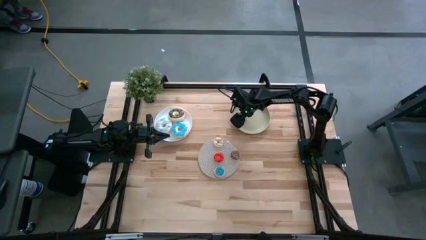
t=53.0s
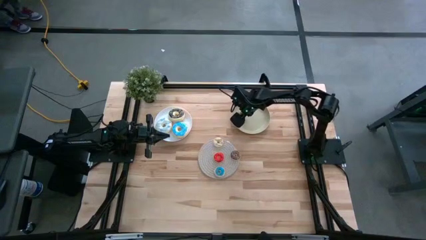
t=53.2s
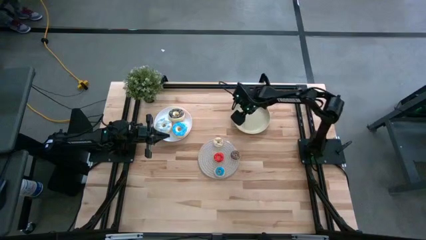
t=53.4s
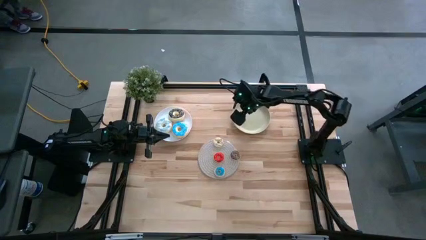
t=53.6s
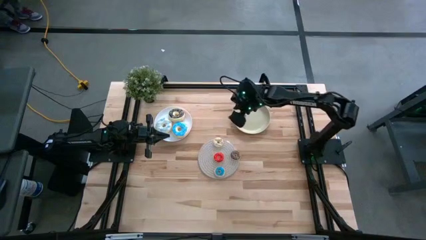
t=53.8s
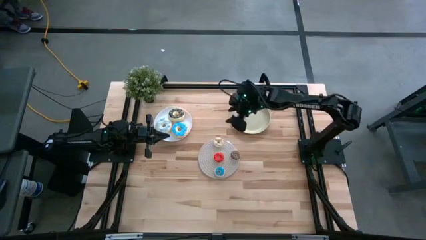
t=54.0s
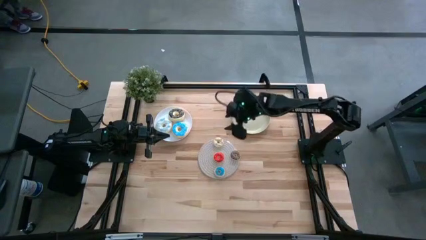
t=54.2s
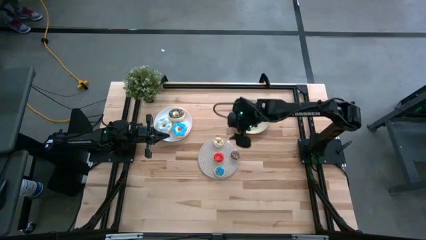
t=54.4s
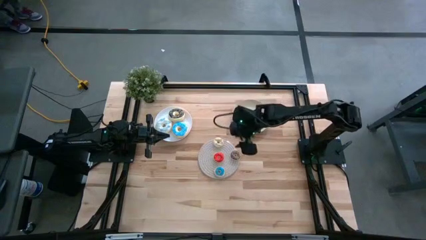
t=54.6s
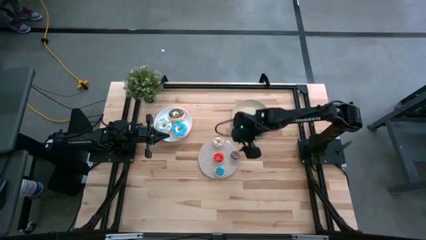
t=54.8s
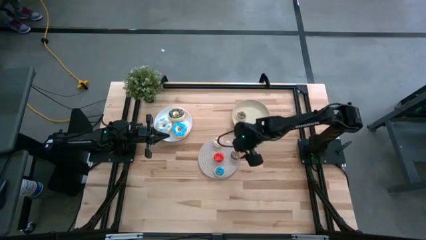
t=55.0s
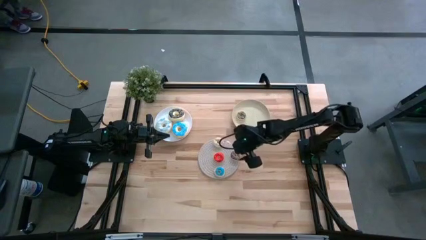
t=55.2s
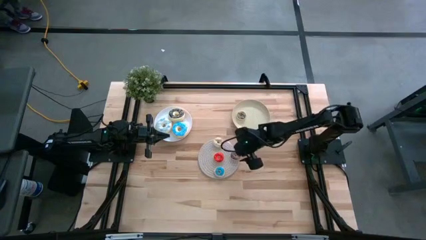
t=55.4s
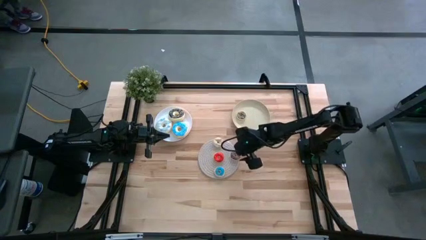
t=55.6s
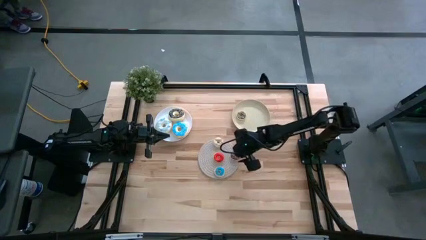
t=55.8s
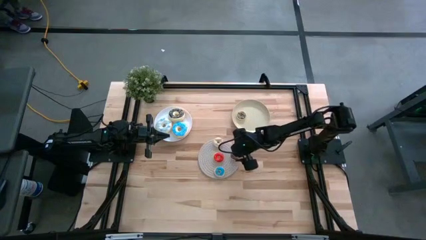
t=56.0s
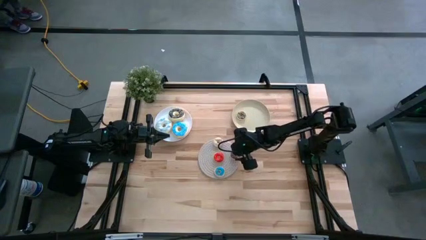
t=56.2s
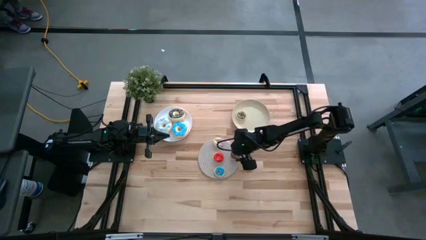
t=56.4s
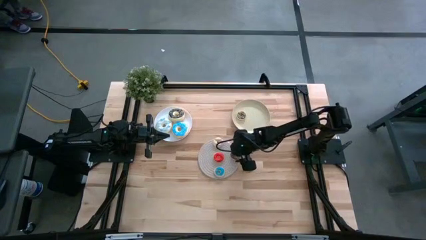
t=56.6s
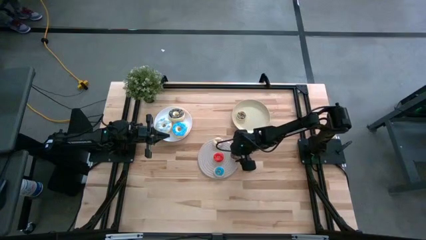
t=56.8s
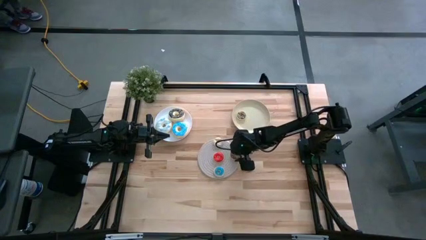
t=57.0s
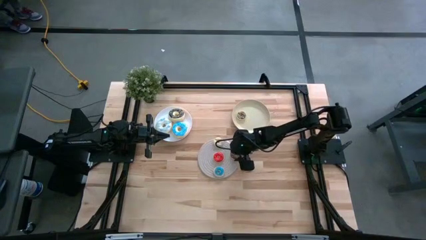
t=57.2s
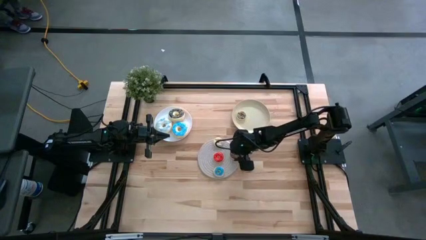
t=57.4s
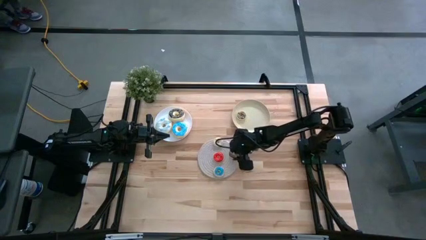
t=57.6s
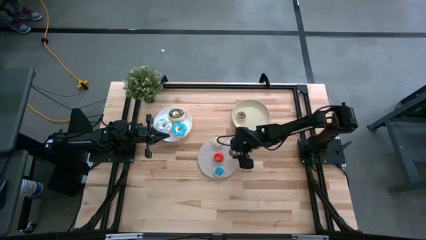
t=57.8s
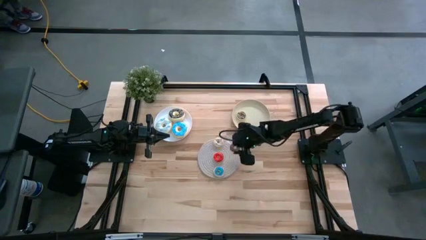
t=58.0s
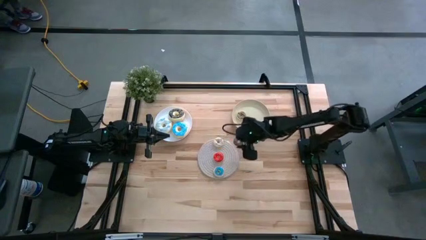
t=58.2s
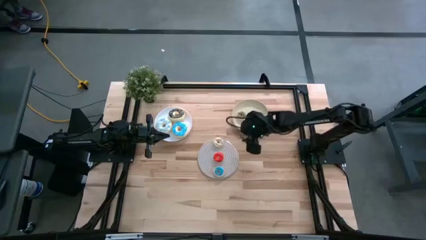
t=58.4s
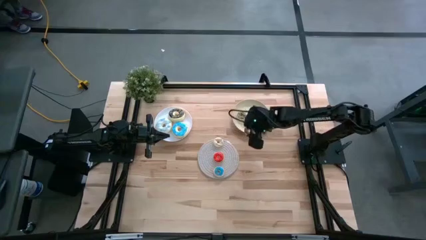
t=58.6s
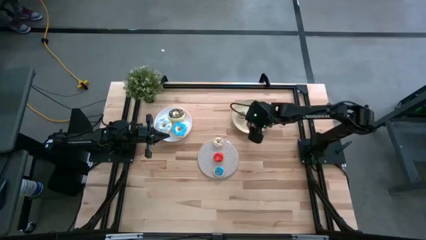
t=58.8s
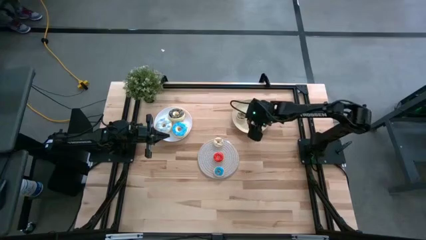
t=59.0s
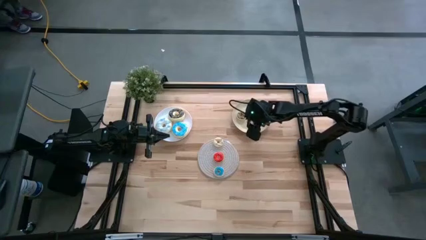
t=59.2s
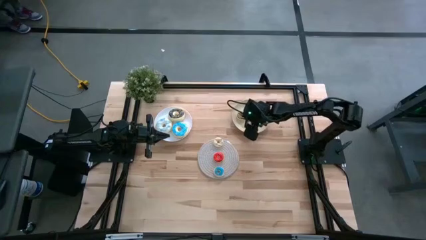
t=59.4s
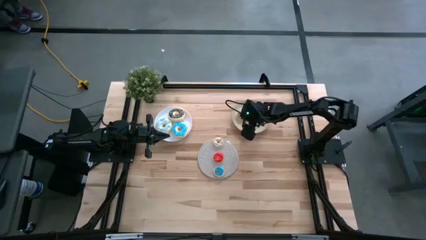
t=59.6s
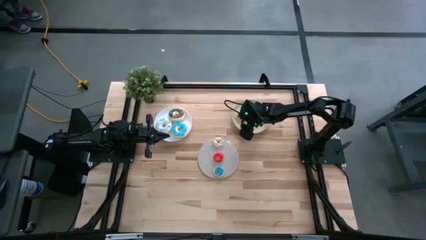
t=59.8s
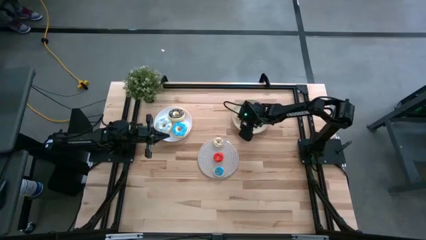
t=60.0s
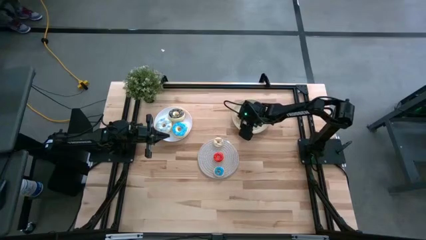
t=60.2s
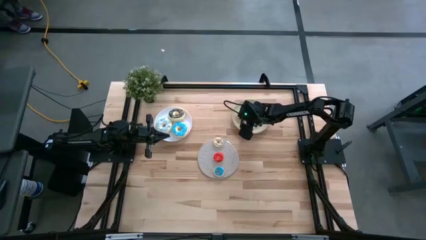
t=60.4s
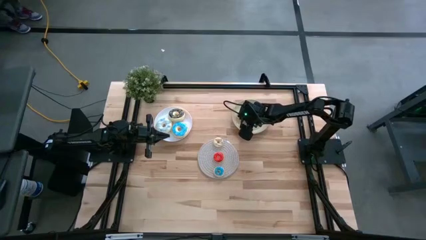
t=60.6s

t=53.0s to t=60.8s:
Task: Pick & Place donuts
Put the small chocolate brown donut on the brown plate

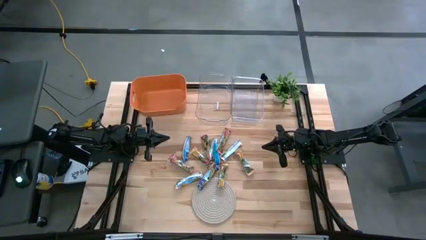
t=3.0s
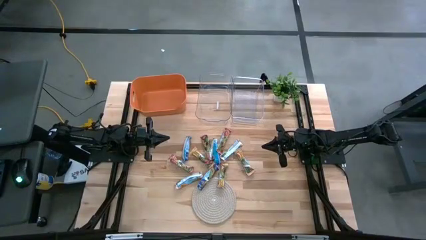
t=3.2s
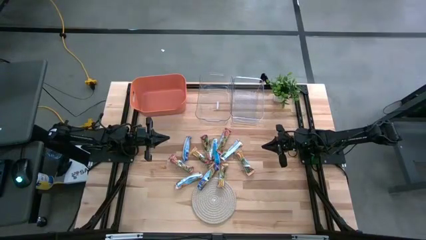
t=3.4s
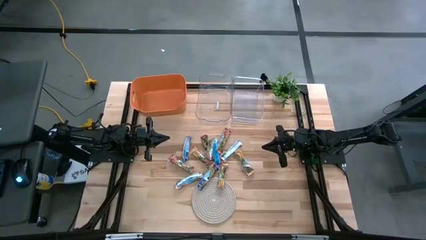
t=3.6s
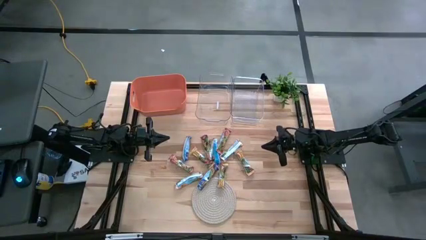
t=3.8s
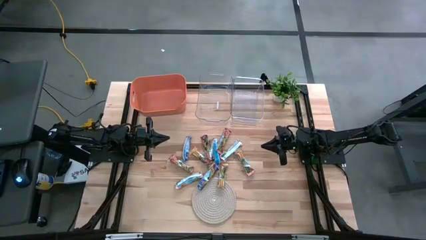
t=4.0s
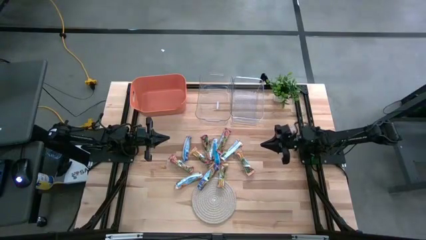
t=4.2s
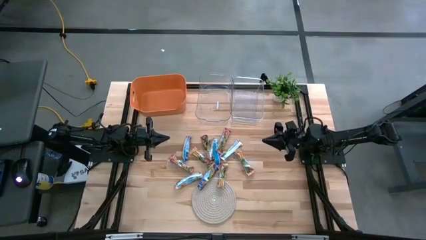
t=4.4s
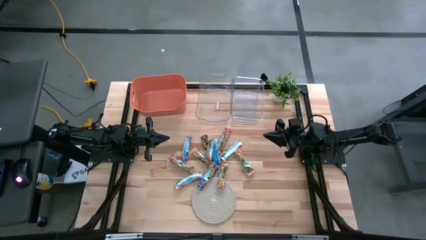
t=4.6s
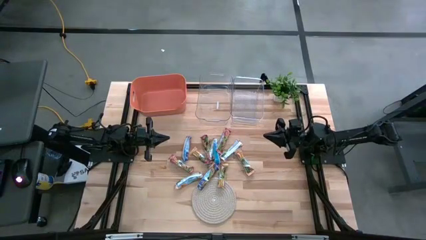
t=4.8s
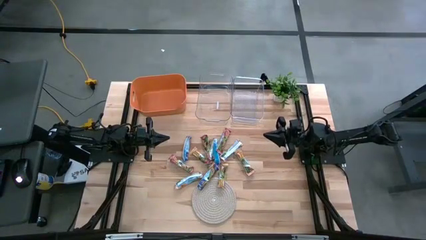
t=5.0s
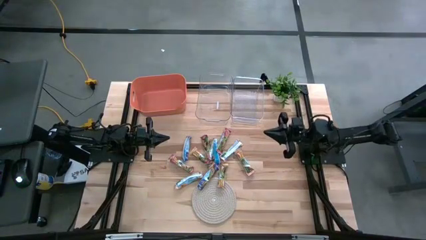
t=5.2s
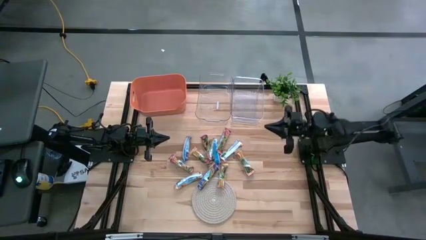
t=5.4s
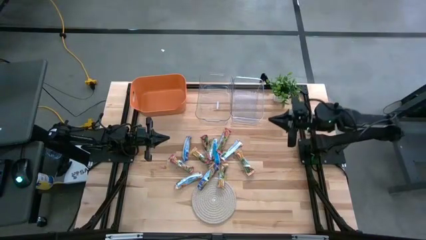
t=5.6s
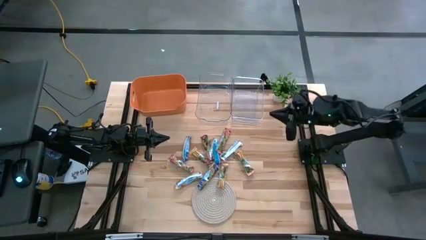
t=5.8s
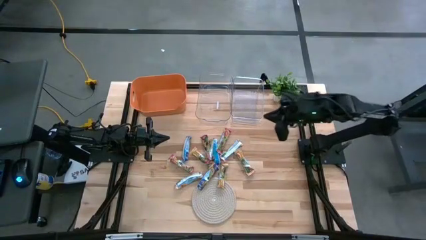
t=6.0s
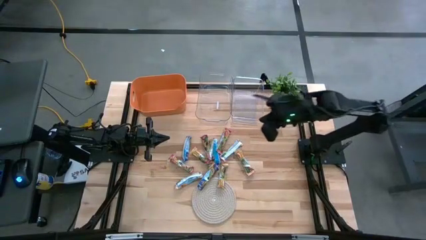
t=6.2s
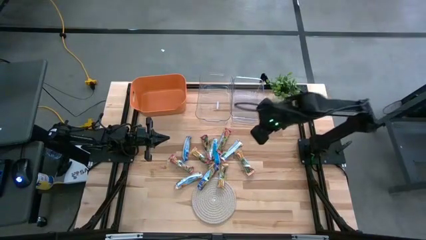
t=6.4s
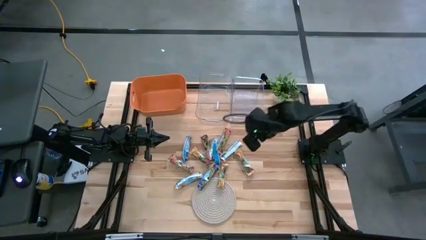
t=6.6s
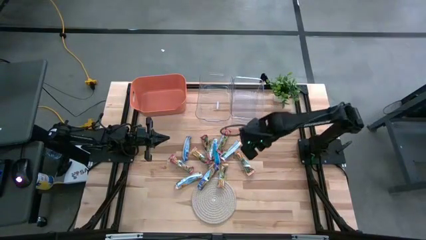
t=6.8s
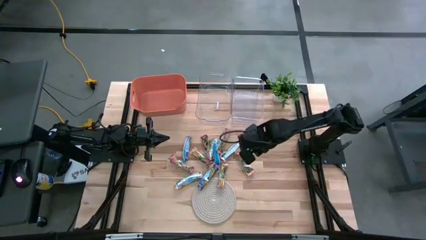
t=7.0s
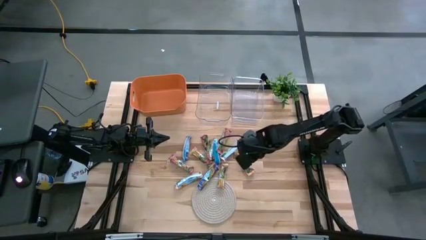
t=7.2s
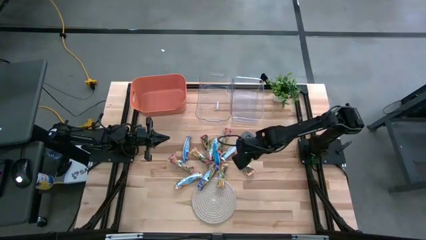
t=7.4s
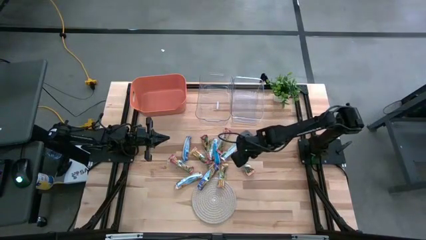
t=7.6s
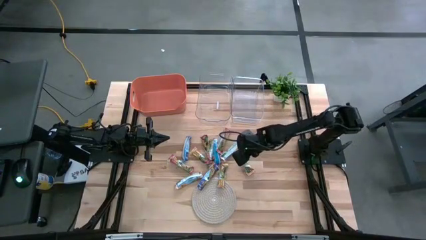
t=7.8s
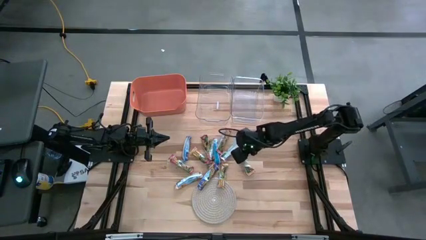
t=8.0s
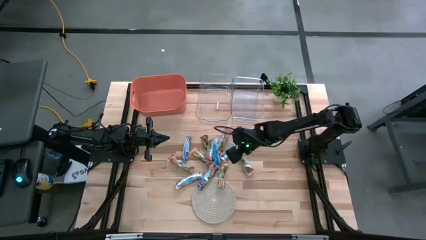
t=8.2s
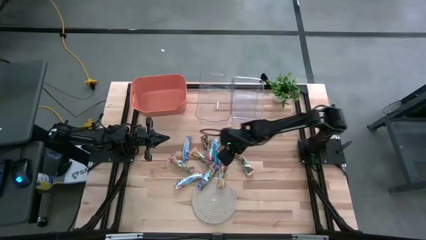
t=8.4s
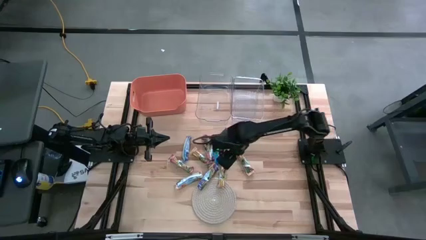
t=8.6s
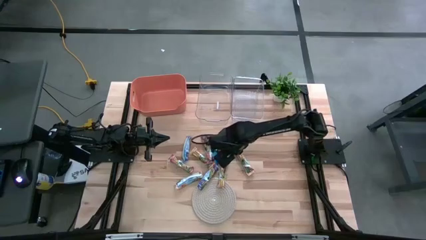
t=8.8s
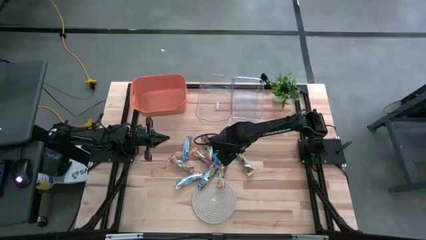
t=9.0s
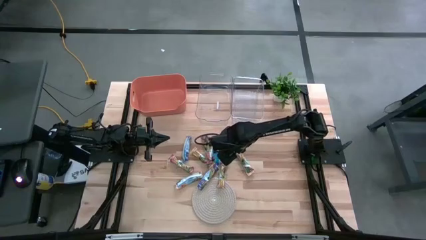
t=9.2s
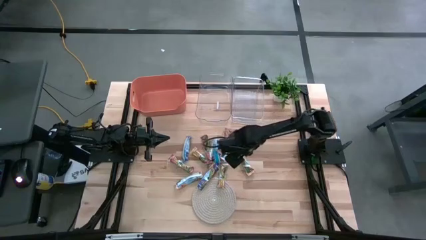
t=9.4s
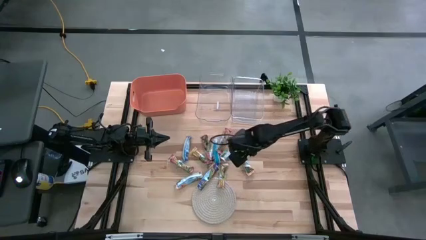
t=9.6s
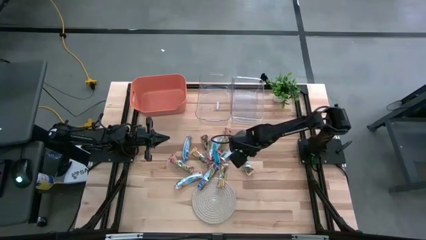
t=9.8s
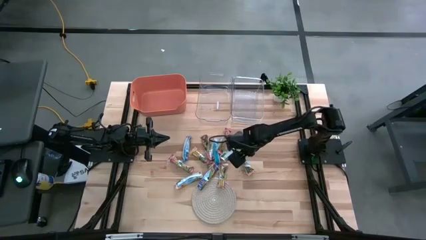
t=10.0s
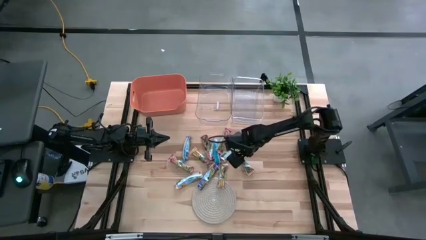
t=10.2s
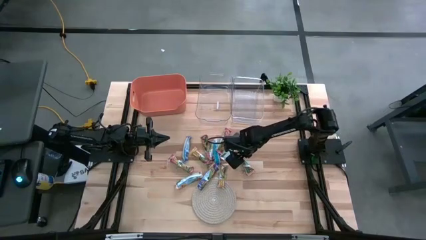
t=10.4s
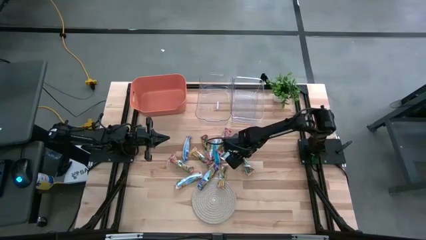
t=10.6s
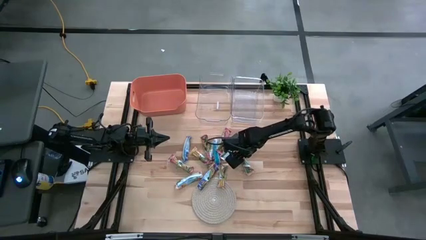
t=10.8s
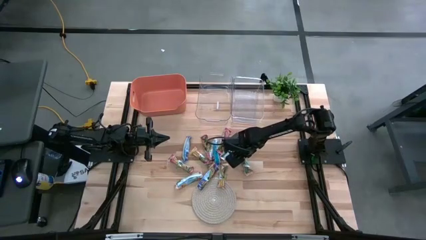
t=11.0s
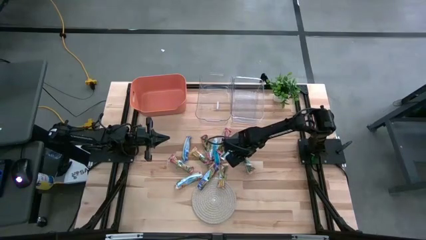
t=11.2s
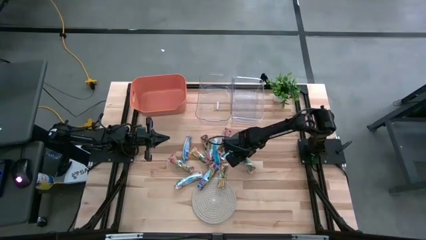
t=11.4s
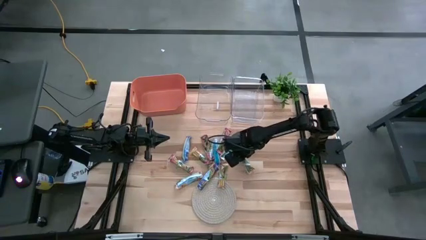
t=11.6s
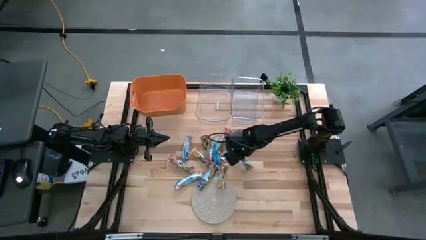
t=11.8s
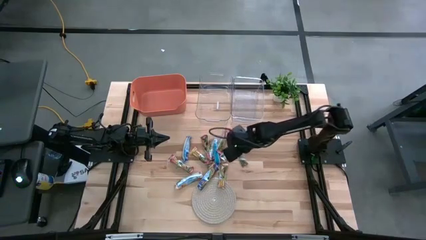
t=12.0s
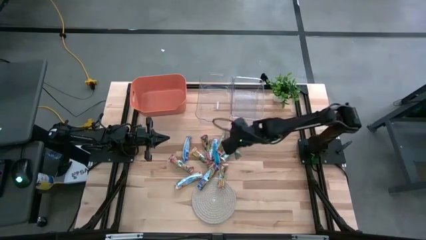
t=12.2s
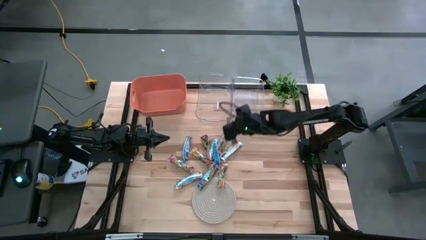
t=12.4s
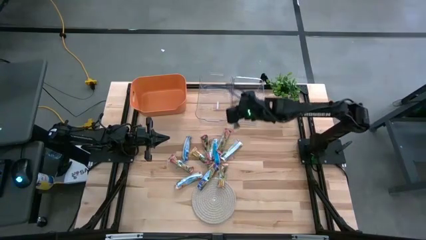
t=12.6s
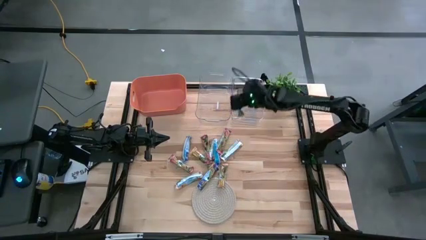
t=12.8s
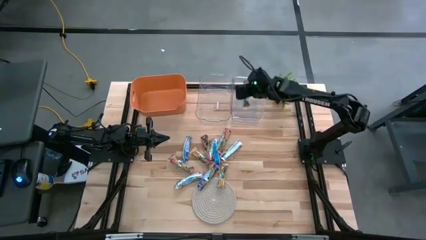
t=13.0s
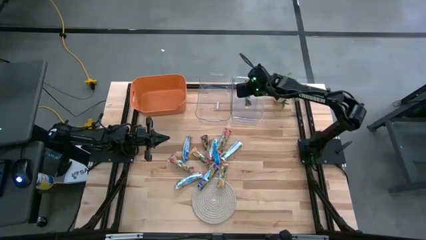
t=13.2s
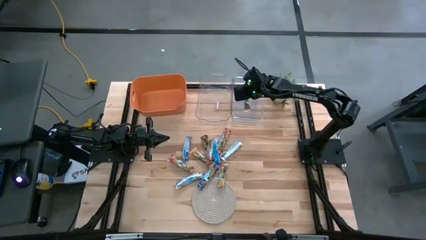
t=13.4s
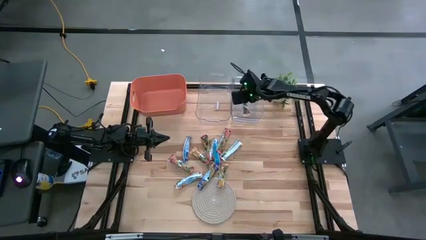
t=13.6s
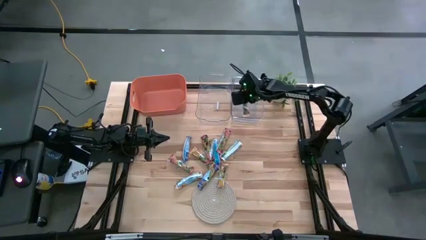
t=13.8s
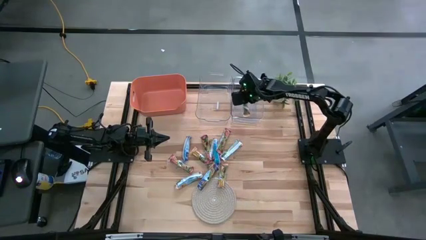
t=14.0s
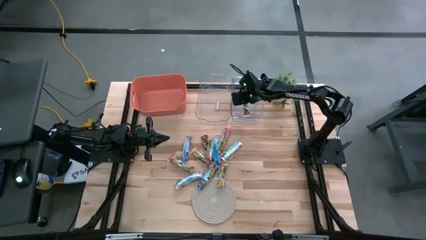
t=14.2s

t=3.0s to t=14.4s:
Task: Pick and place Granola Bars by type
Put the yellow granola bar into the right transparent bin
